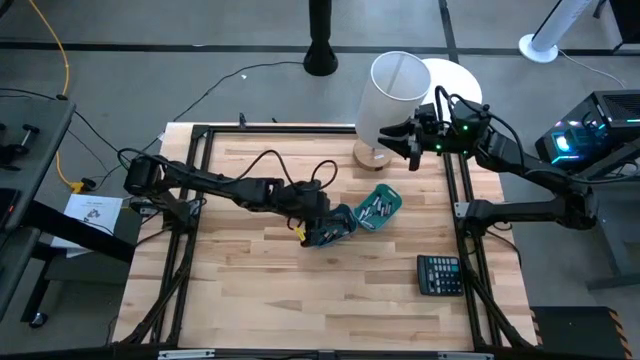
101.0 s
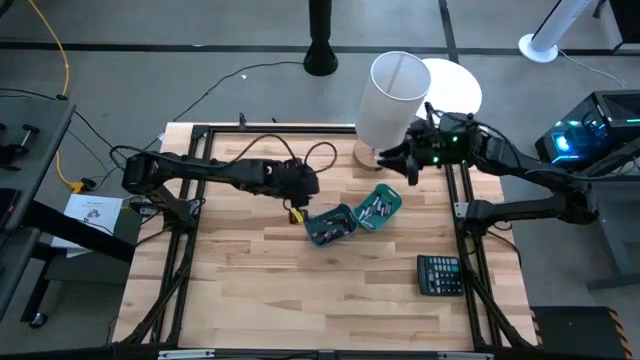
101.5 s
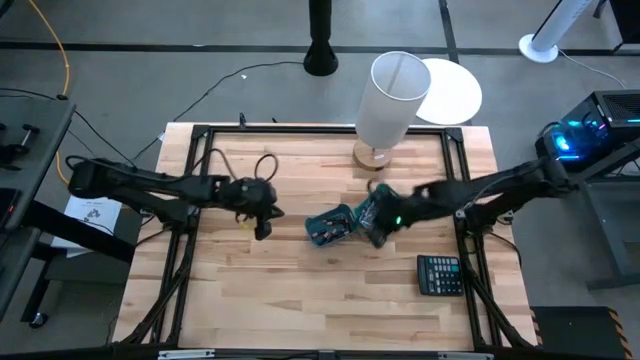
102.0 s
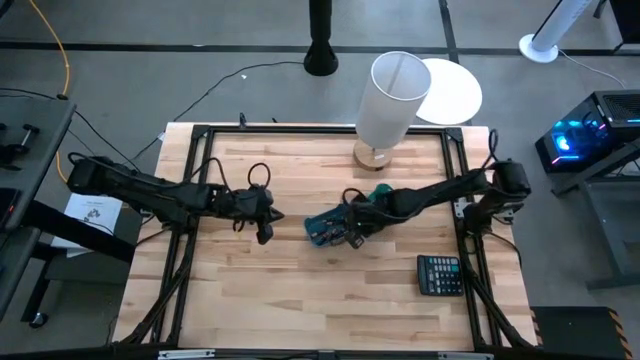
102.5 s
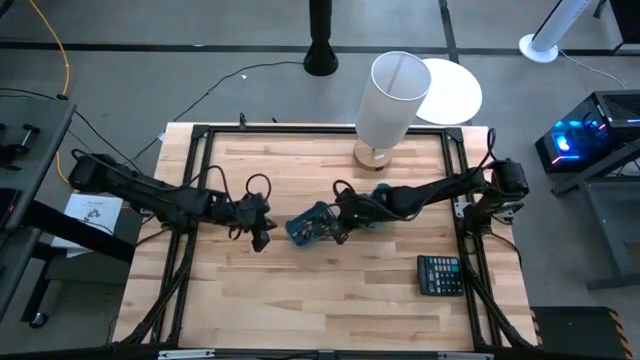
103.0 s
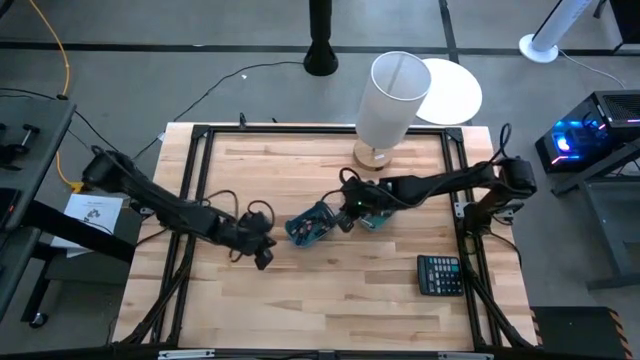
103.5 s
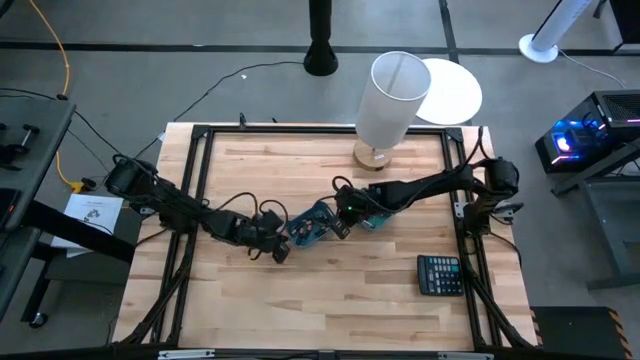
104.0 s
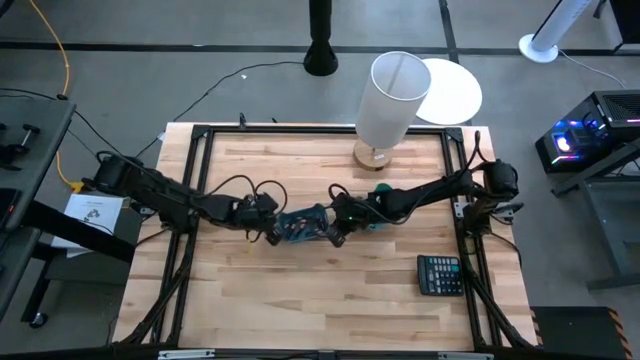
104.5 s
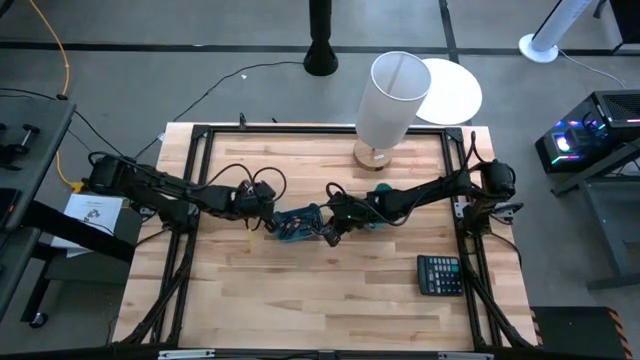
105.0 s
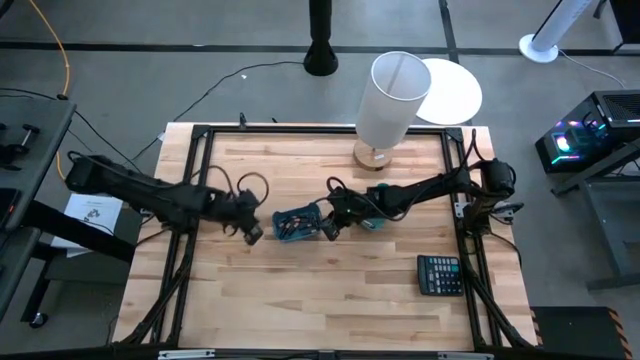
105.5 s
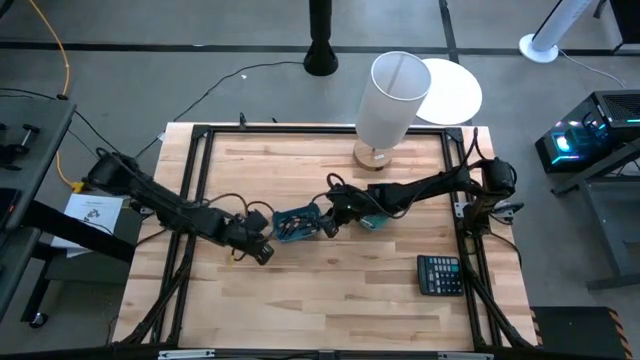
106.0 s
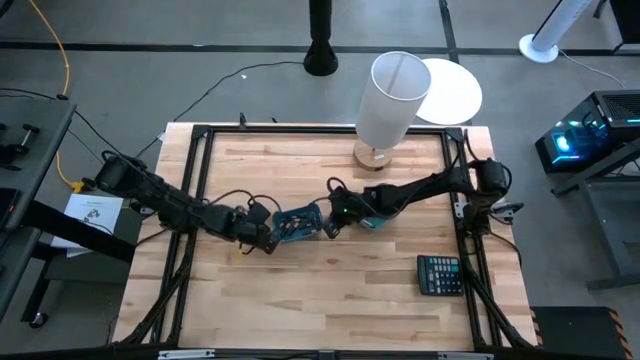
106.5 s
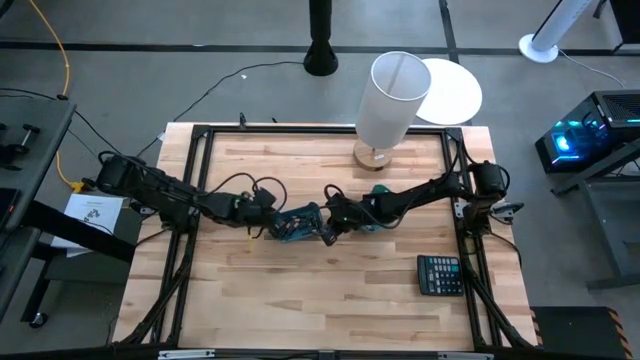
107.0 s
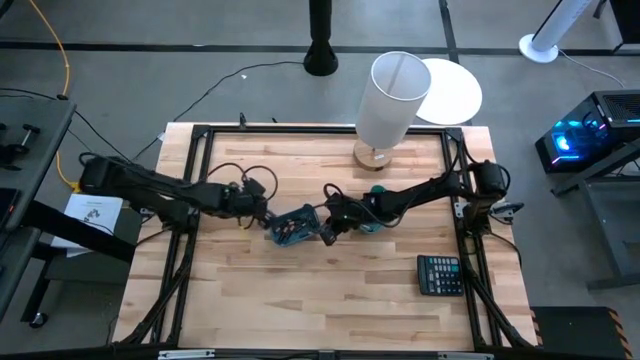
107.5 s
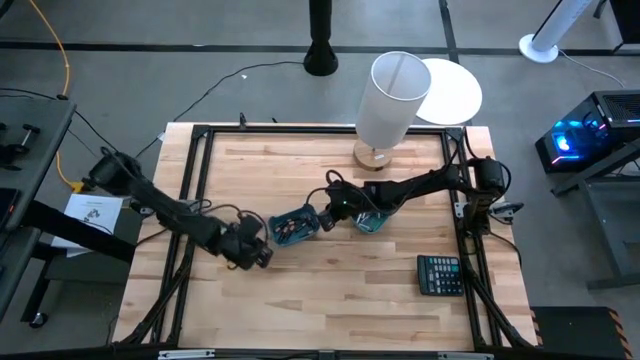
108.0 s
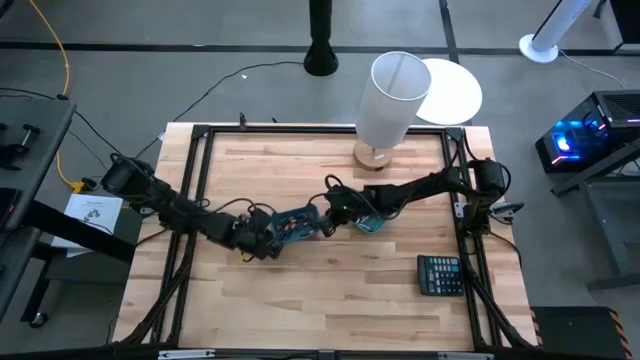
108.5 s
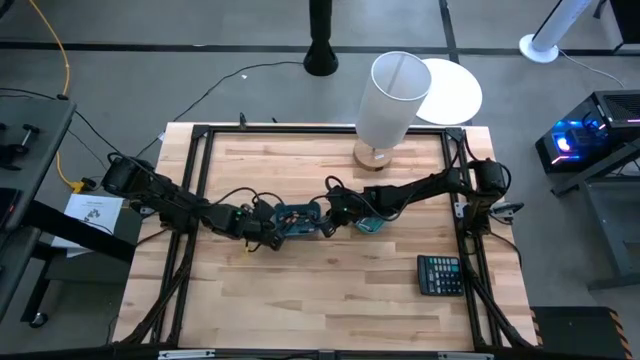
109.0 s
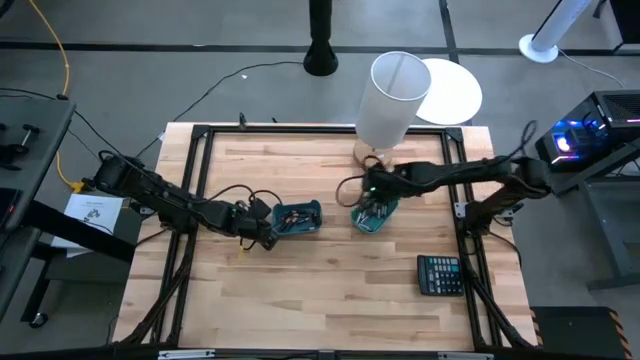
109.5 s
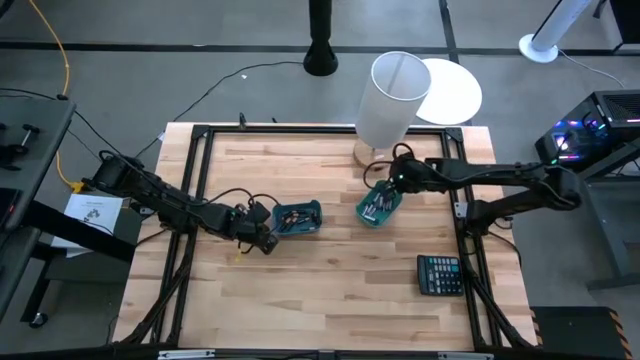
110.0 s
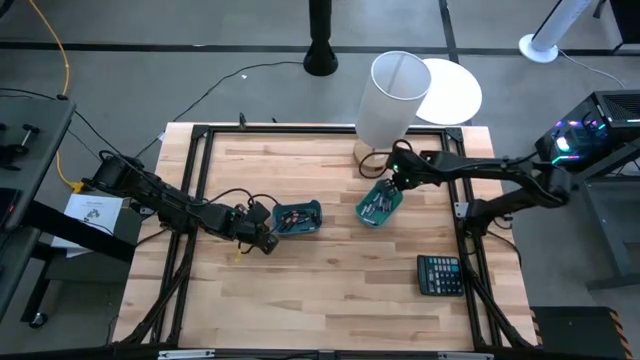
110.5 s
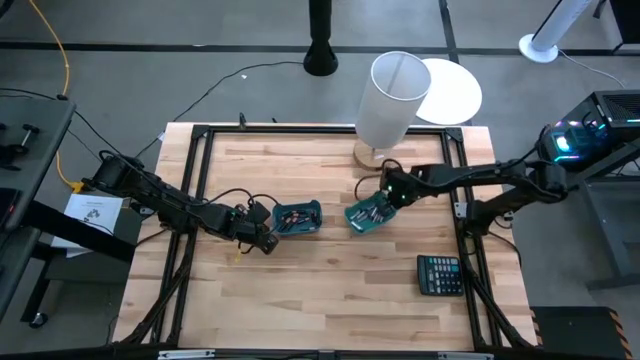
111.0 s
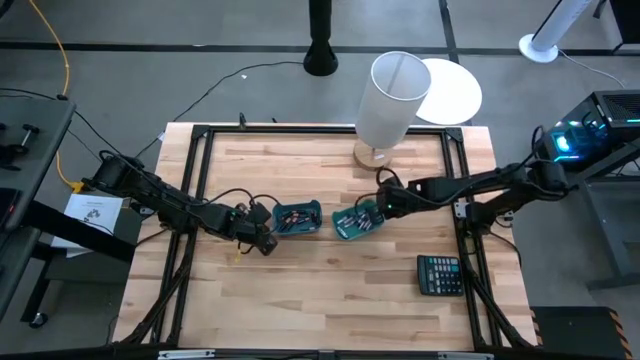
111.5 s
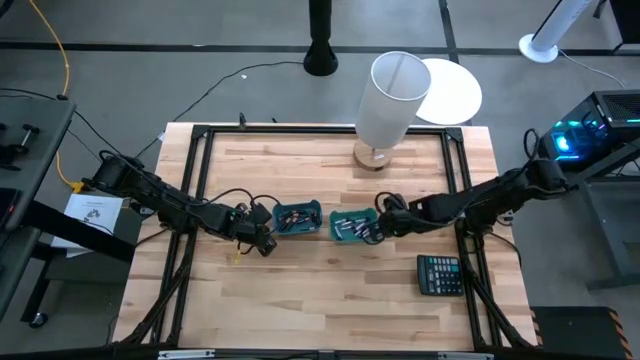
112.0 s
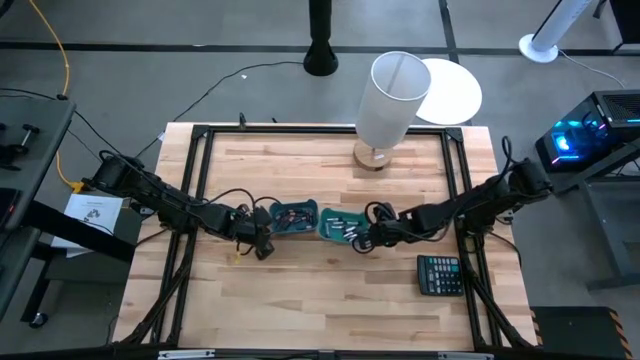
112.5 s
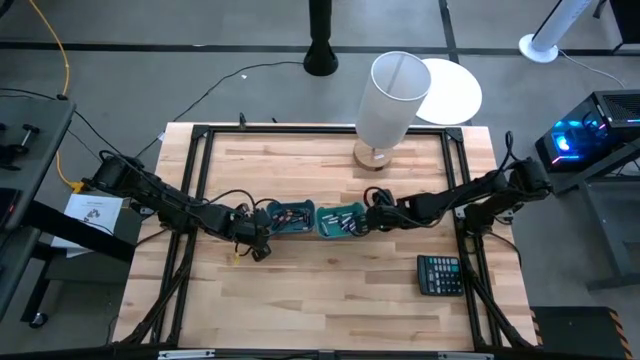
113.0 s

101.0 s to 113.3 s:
Task: Sort batteries
Adjust the bins to the center of the table

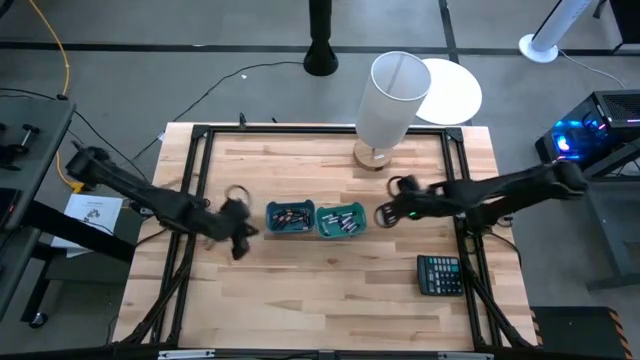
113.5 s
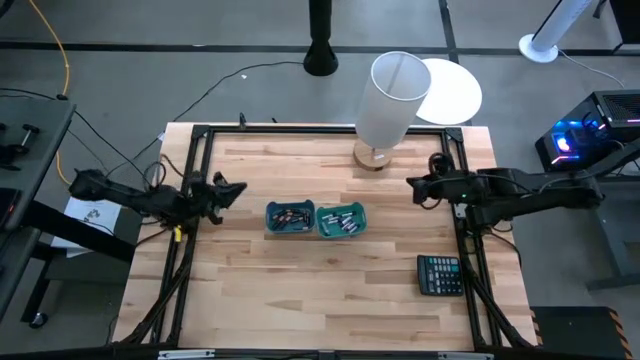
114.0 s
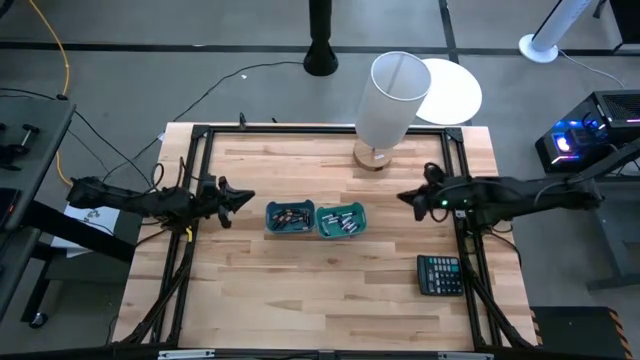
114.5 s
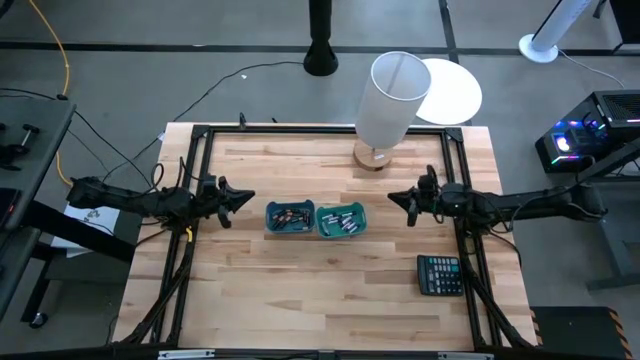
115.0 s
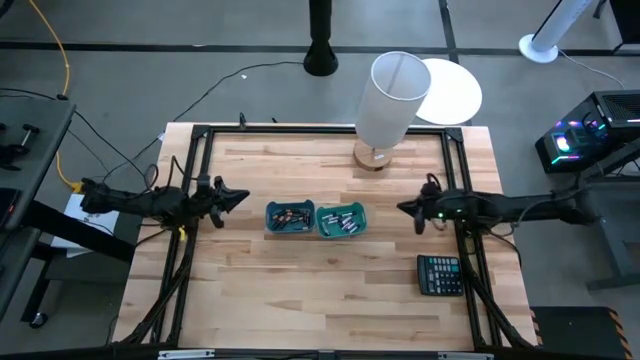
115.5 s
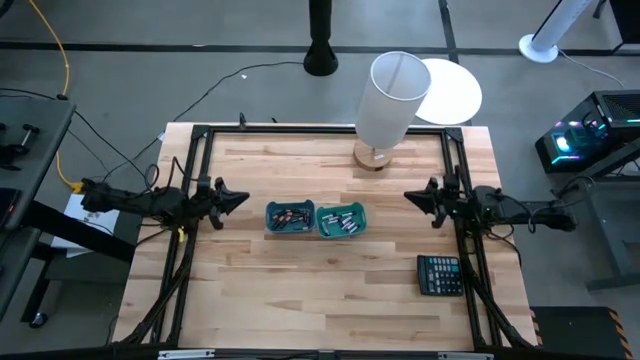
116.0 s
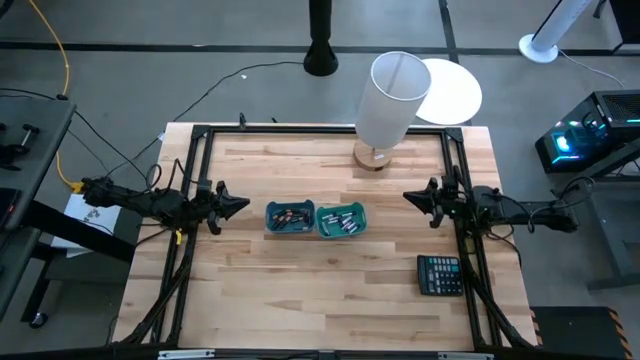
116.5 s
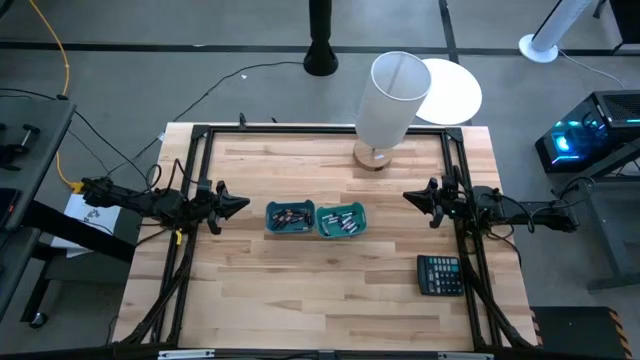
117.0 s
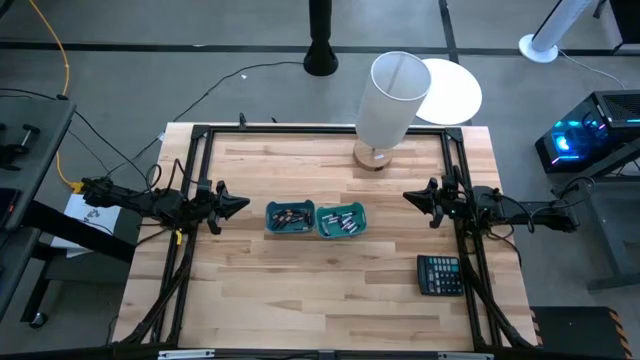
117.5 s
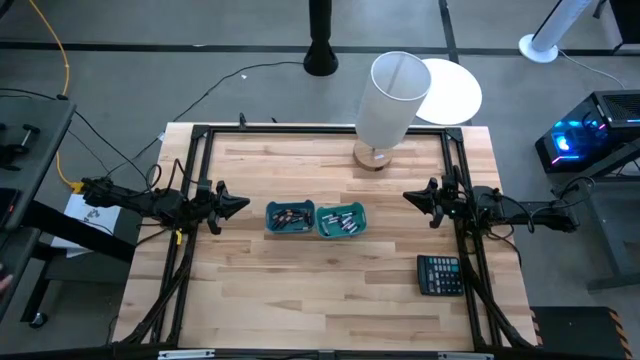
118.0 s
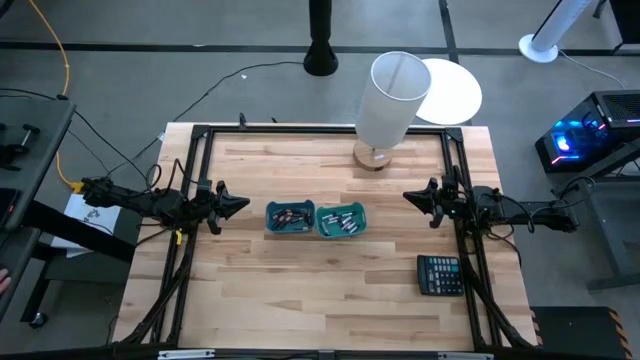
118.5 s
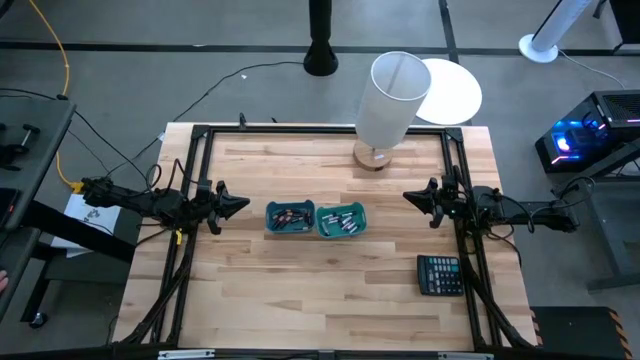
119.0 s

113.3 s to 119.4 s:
Return to Home Position

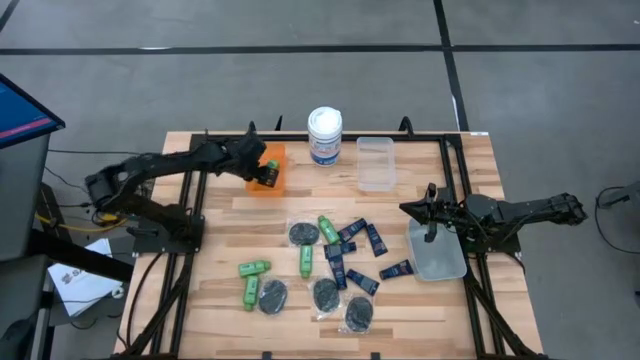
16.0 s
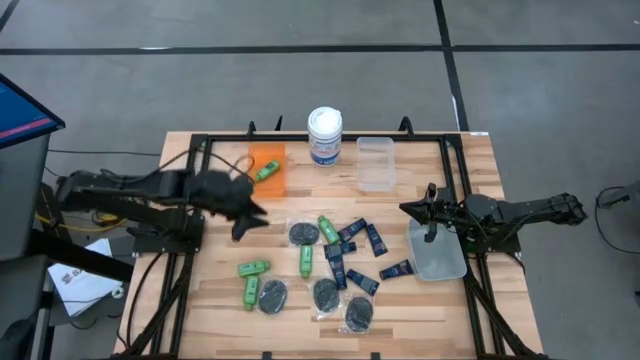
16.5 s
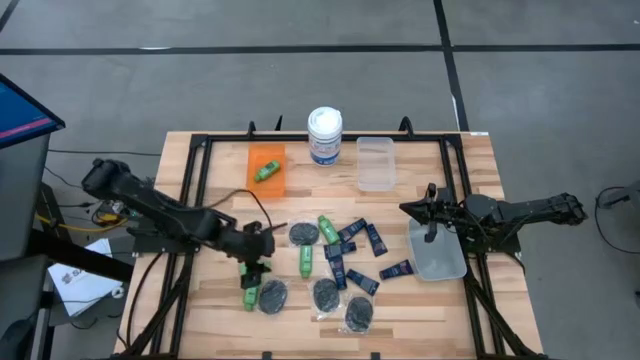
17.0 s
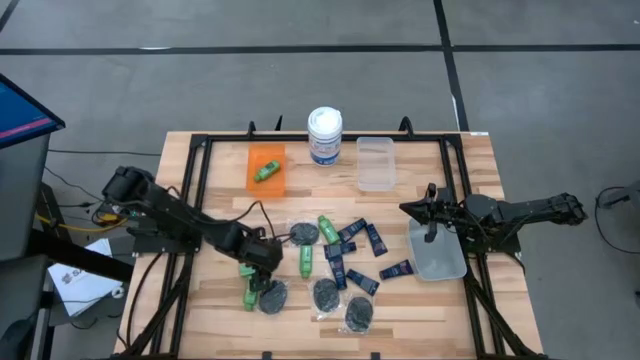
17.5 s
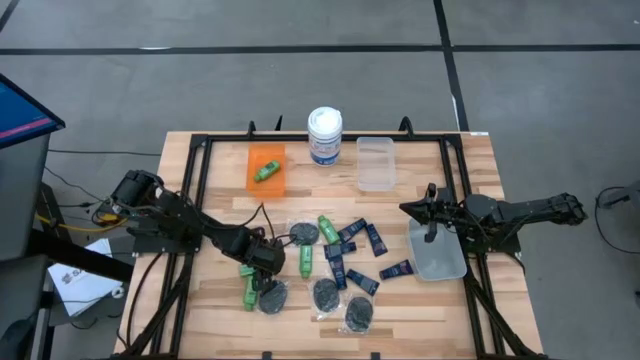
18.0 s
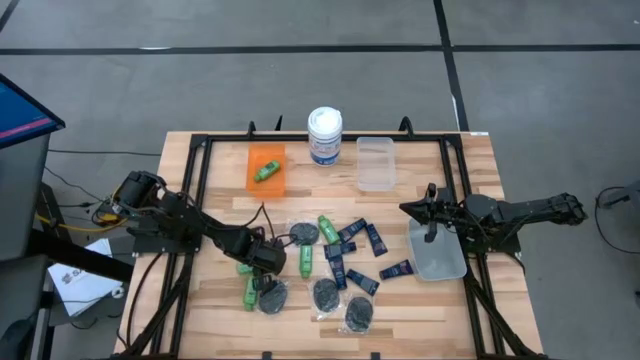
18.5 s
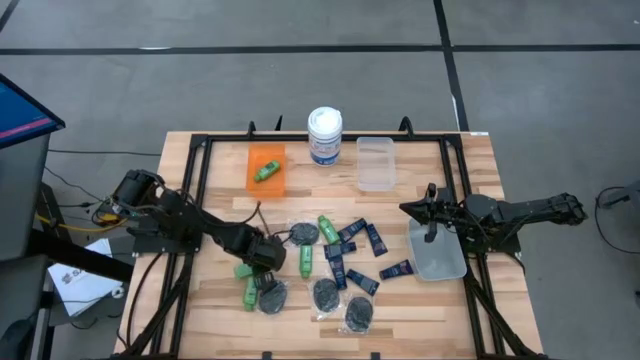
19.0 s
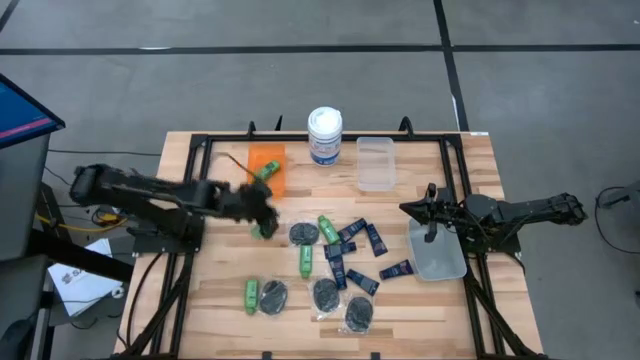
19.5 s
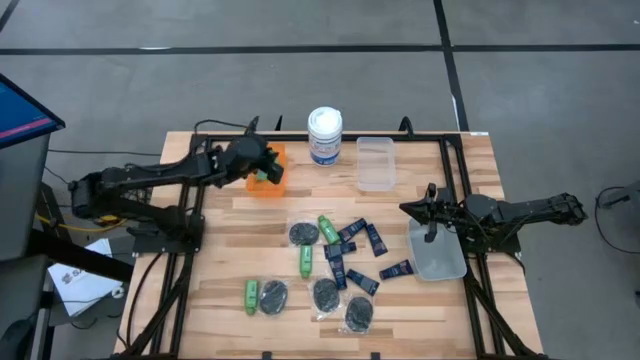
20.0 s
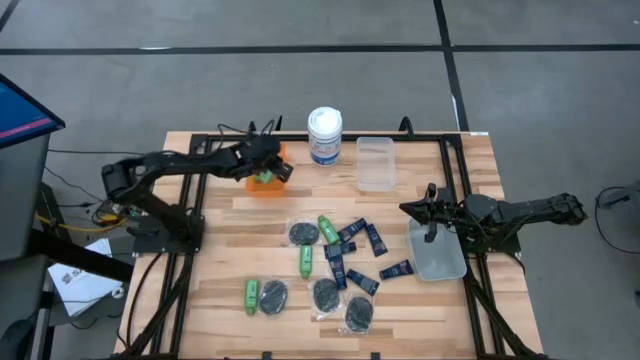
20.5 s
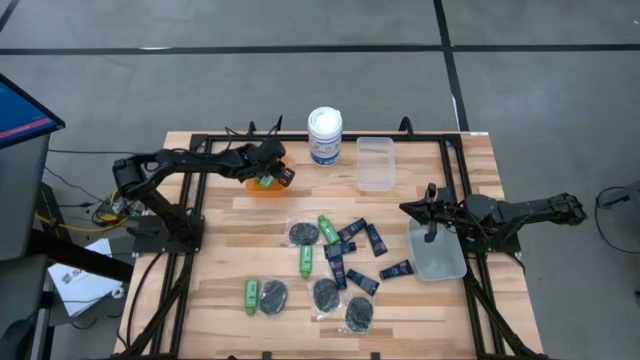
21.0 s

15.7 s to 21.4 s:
Task: Pick & Place Travel size toiletries
Put the green shampoo into the orange bin
